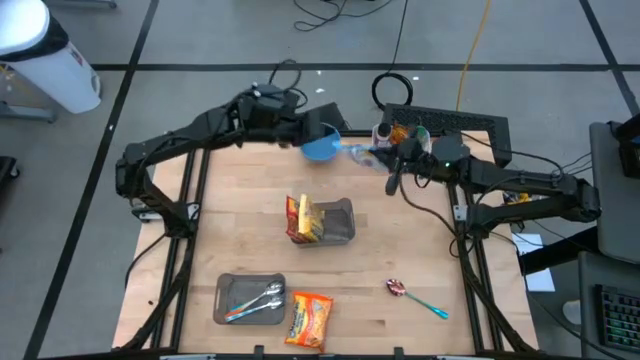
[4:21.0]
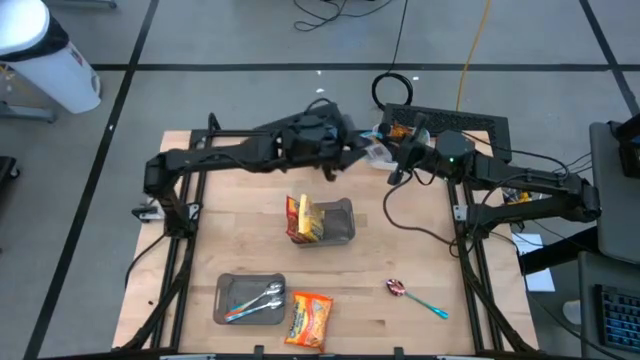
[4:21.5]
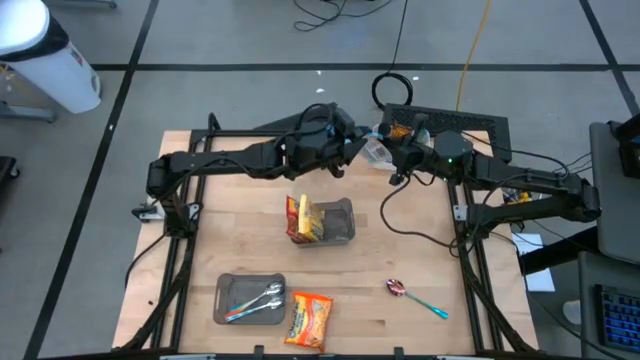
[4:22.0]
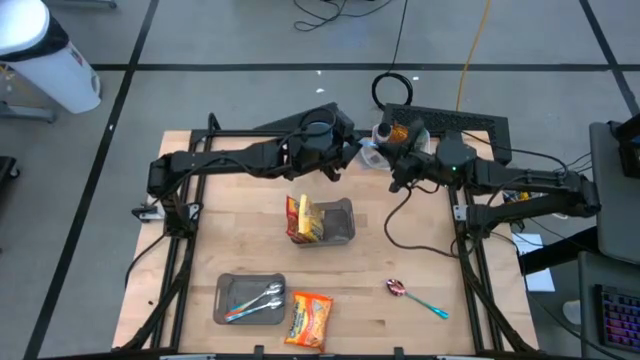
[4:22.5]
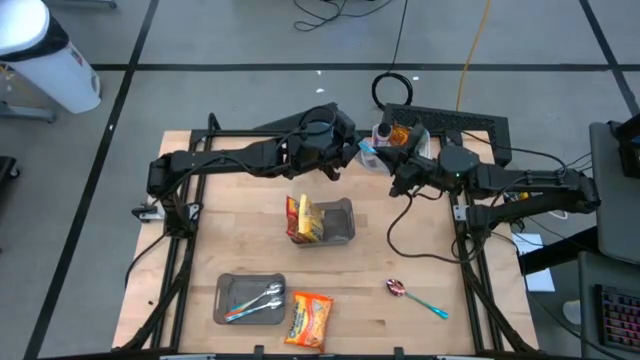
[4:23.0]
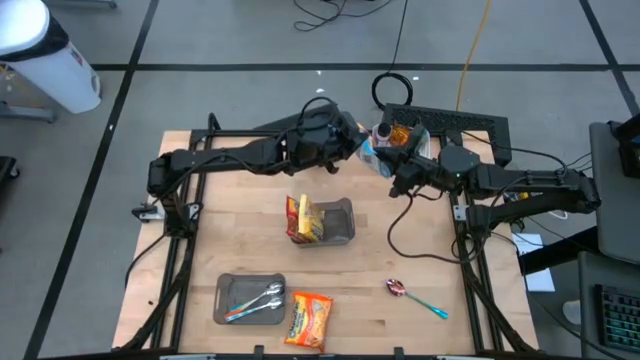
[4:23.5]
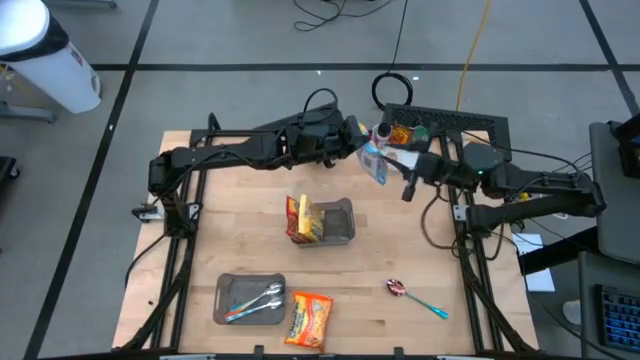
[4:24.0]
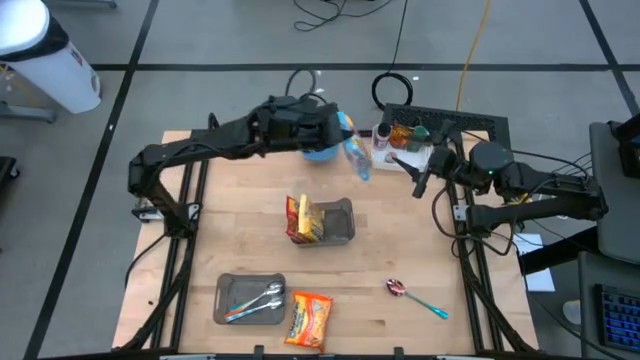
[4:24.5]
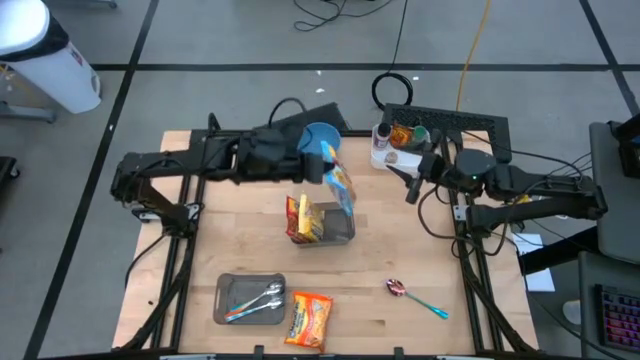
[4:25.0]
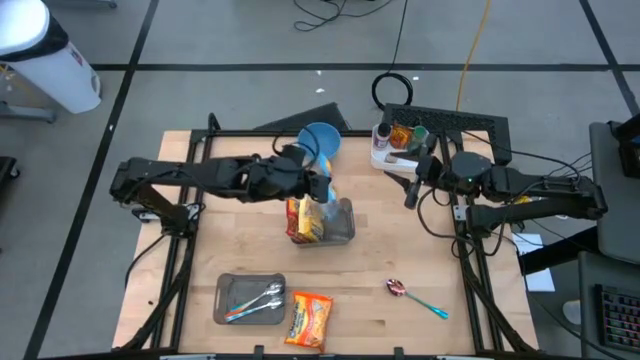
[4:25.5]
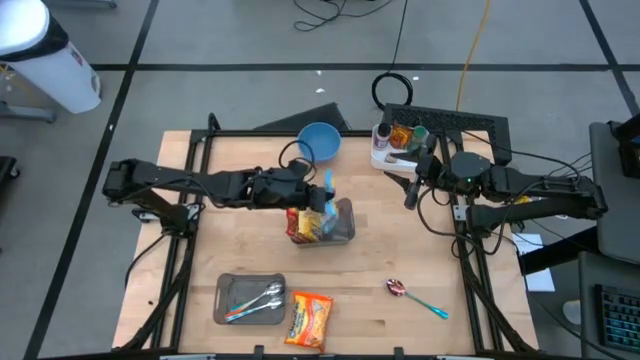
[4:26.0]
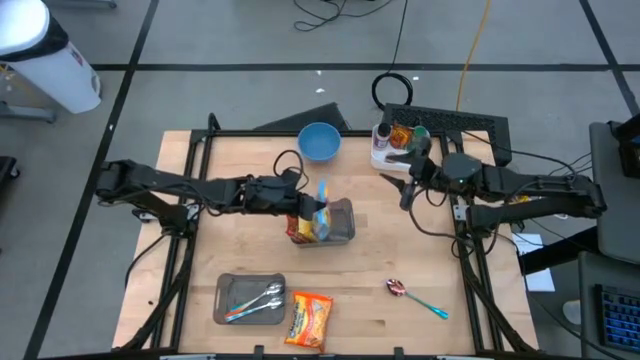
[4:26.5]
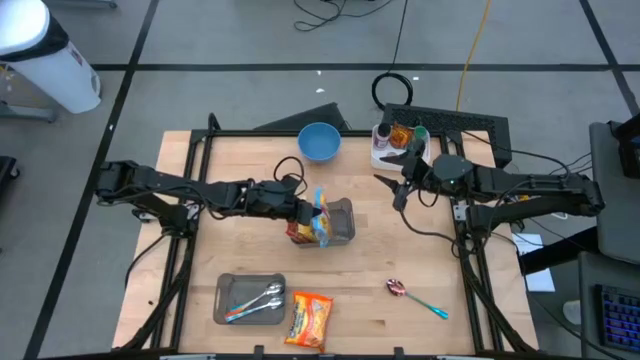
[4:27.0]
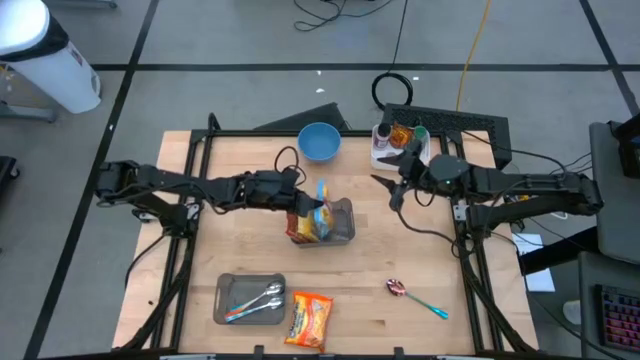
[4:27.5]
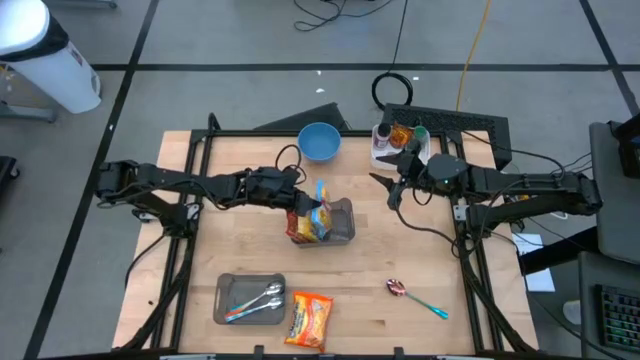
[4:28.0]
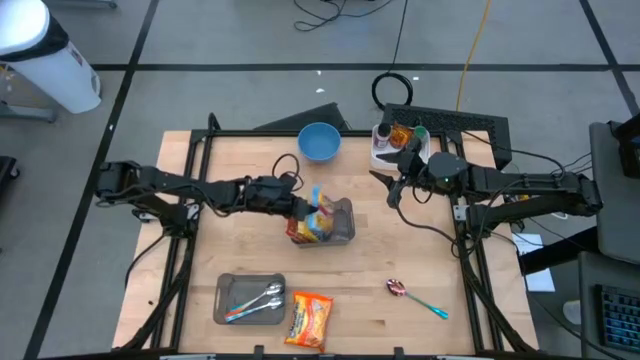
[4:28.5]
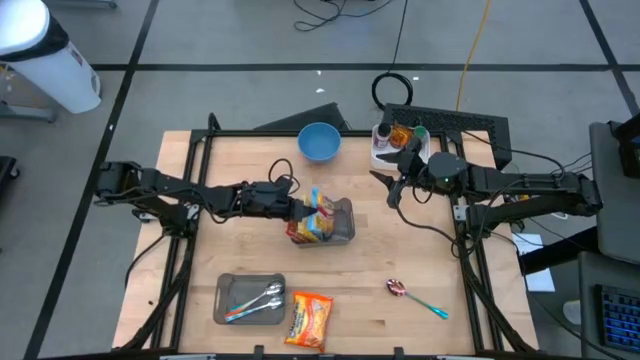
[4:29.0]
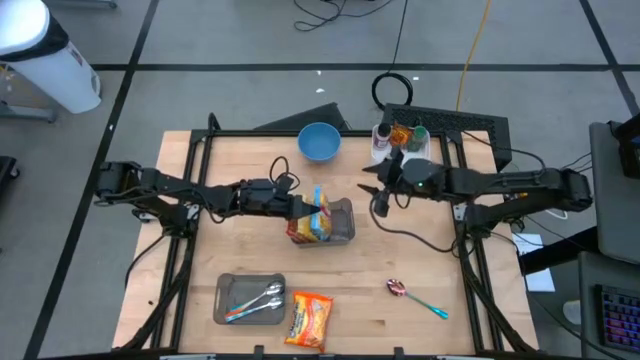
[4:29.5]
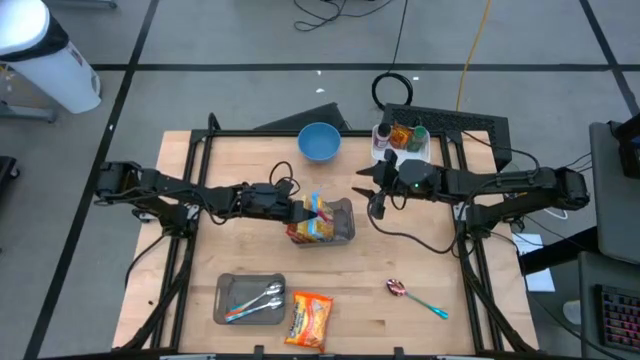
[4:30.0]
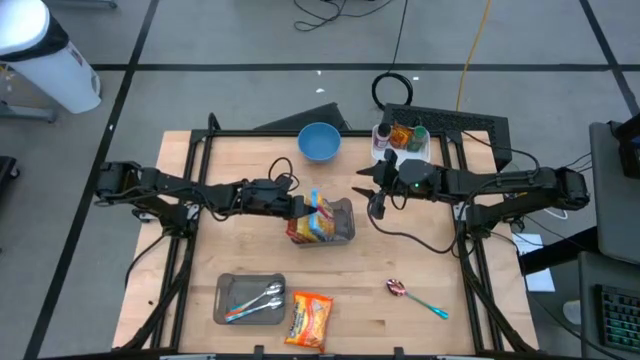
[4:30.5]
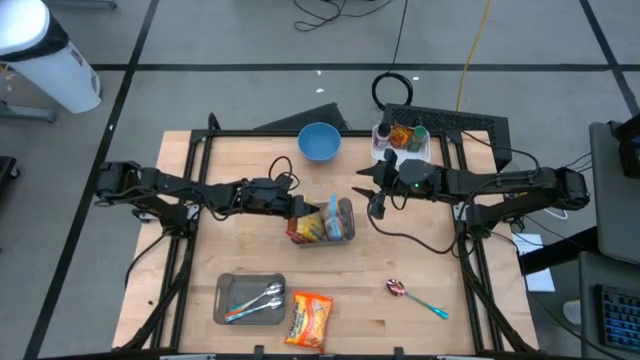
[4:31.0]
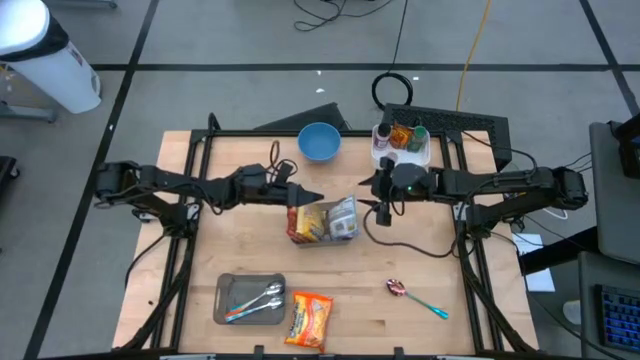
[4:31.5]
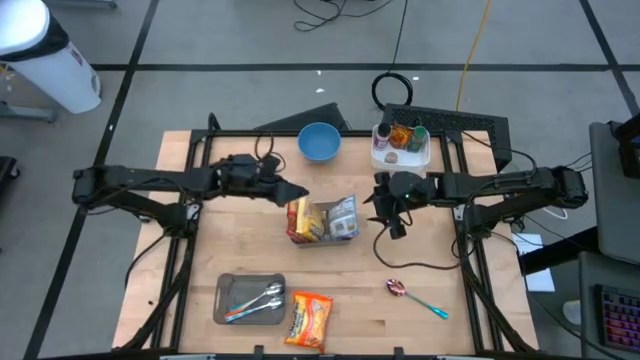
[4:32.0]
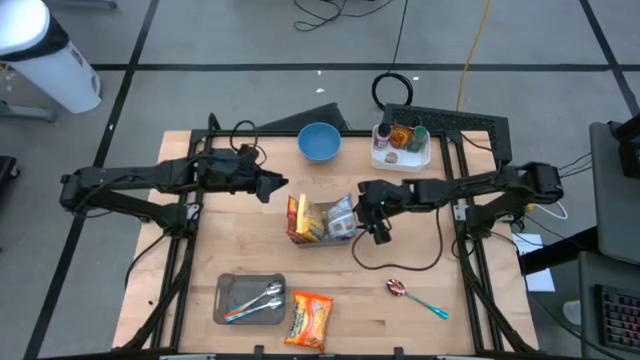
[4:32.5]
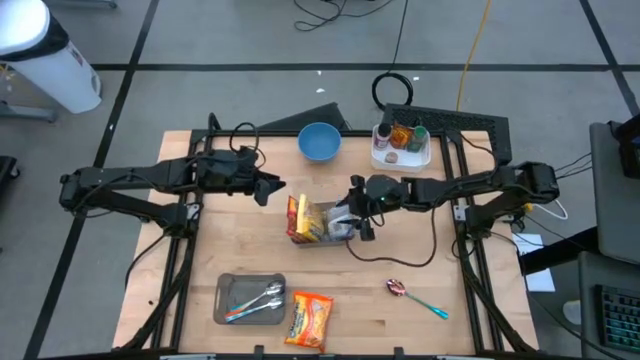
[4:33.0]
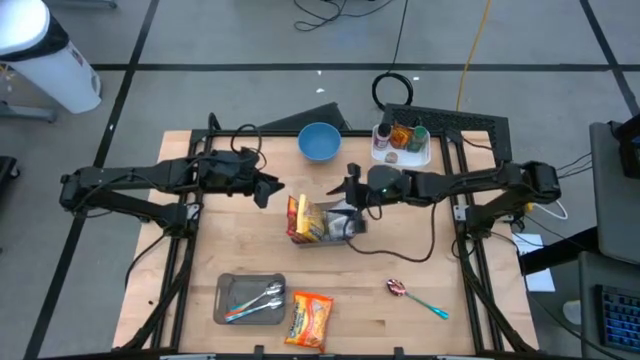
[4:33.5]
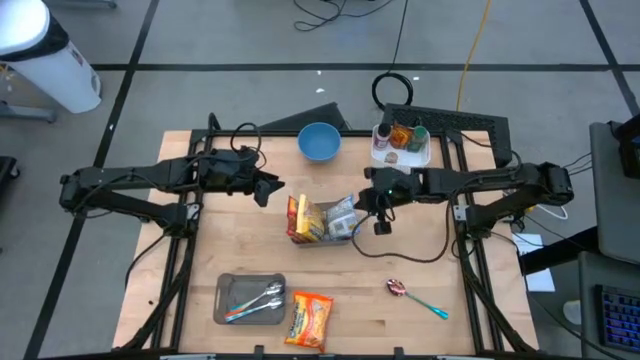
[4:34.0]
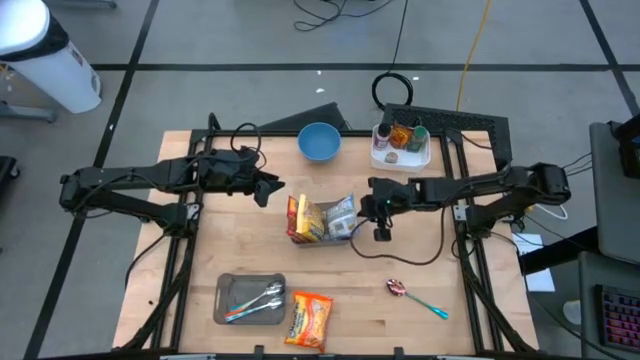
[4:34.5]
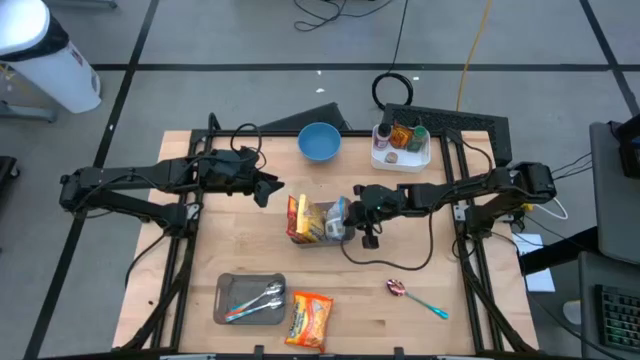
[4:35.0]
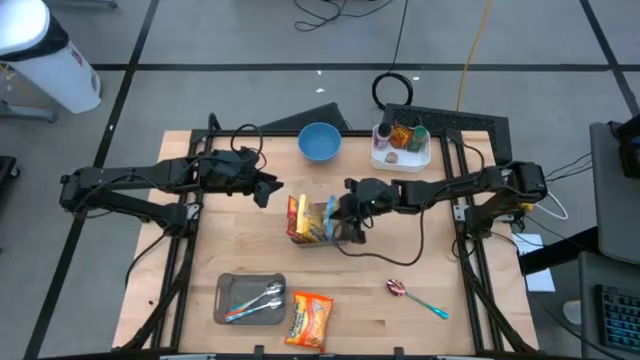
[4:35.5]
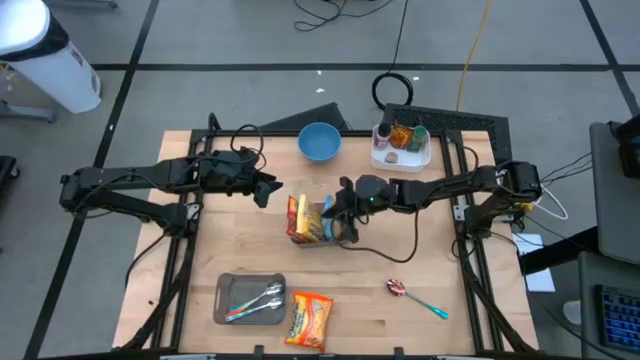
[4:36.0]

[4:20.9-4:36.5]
Task: Pick & Place Food Item
Put the blue noodle pack into the top black bin

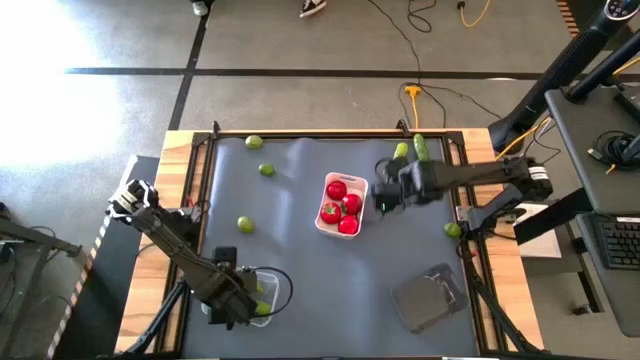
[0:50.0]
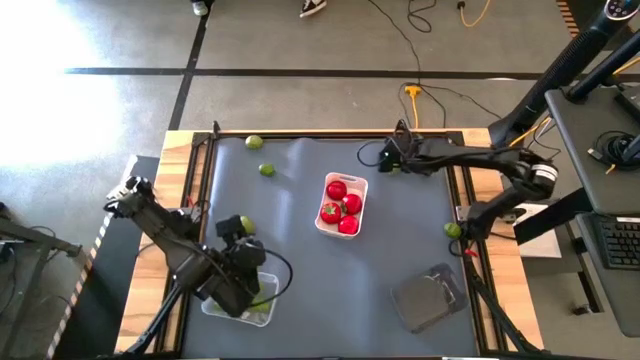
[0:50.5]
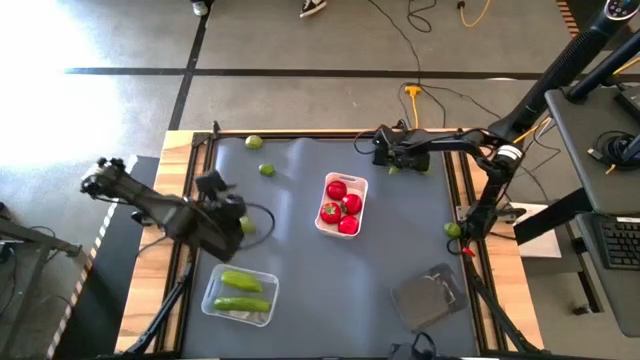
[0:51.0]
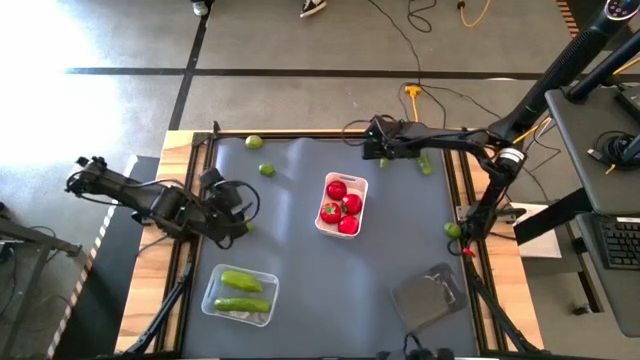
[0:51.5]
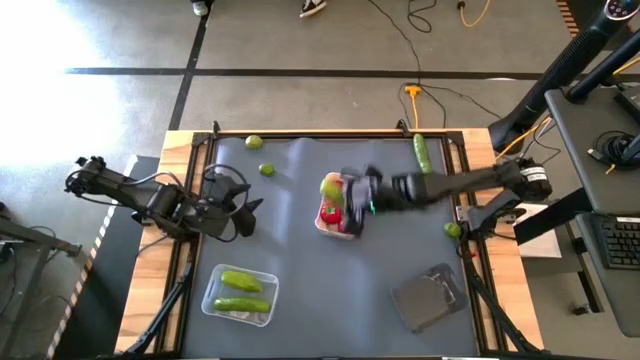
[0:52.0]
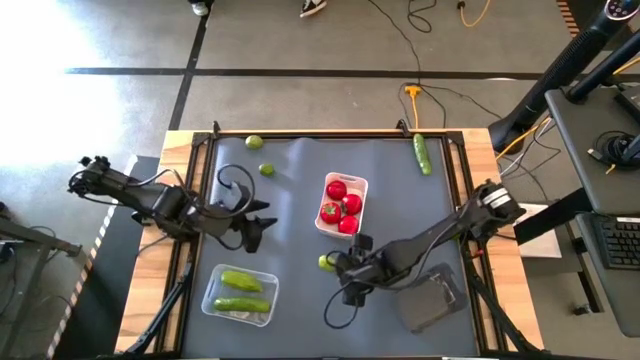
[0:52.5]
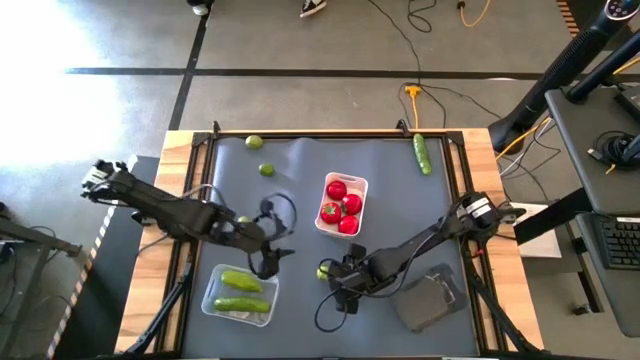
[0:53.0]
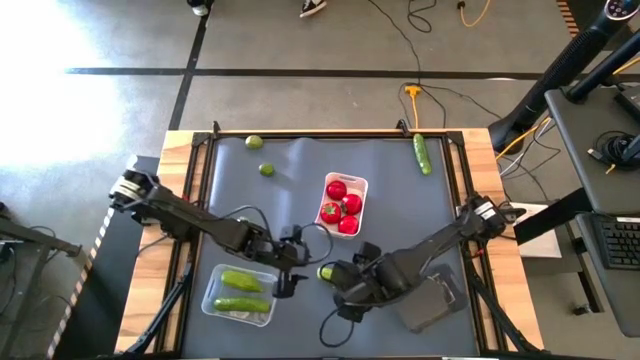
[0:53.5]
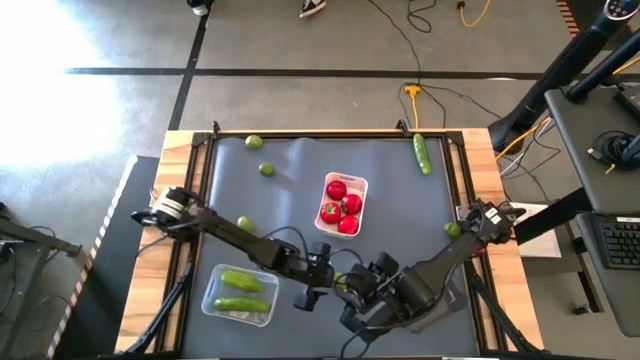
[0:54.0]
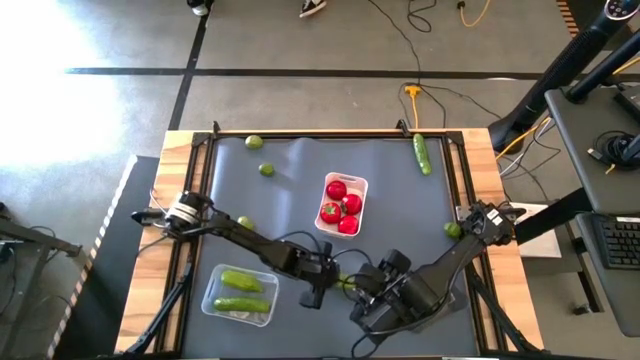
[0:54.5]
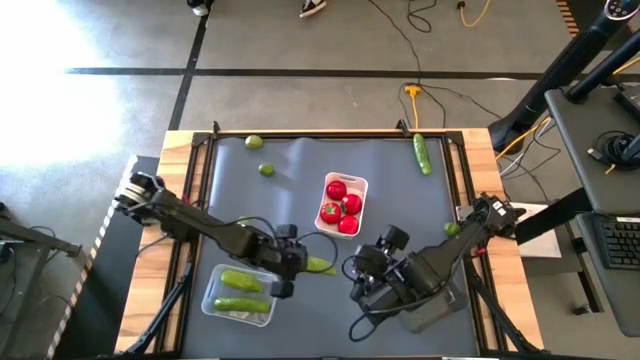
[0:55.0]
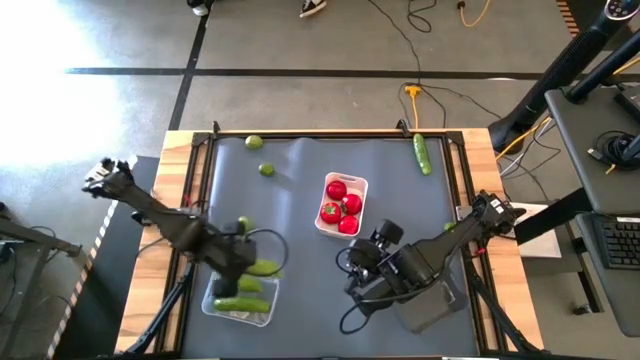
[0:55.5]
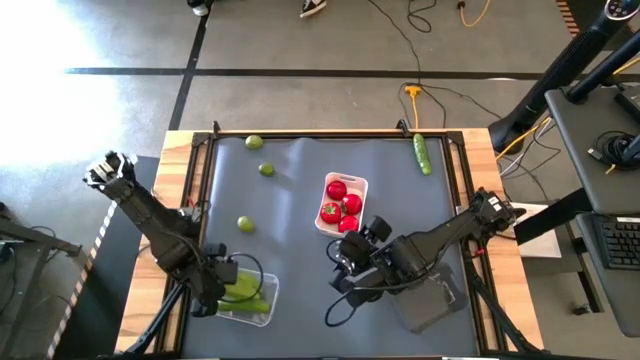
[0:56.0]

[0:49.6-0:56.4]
Task: Sort produce into baskets
Put the left cucumber into the transparent bin
